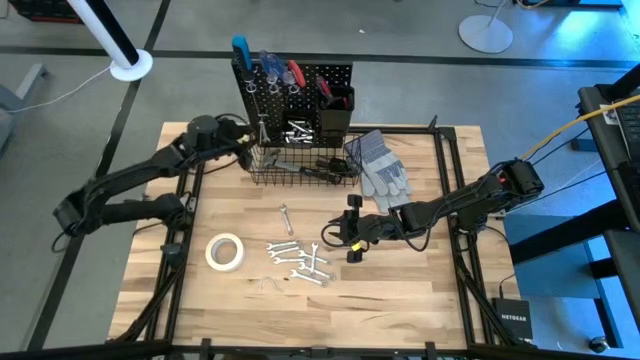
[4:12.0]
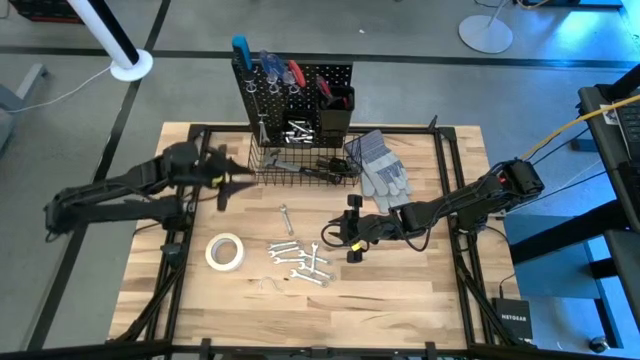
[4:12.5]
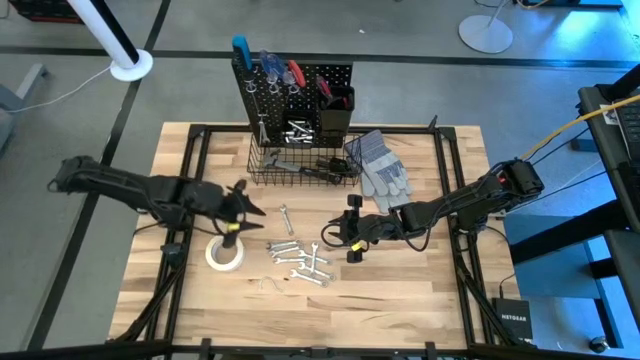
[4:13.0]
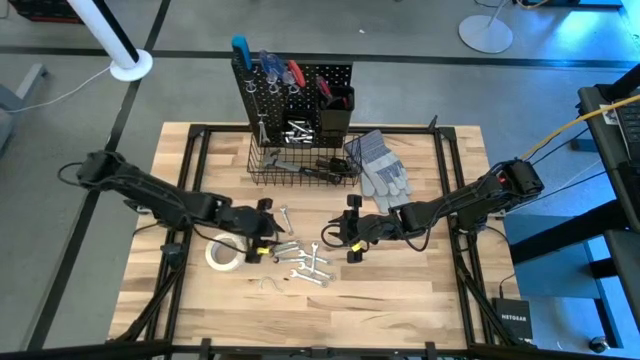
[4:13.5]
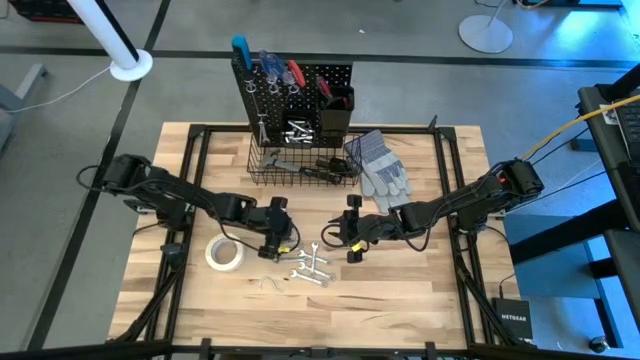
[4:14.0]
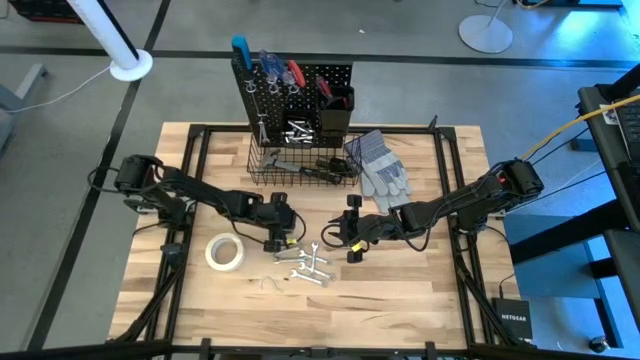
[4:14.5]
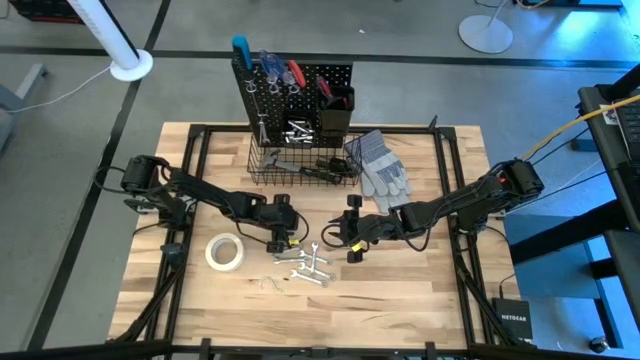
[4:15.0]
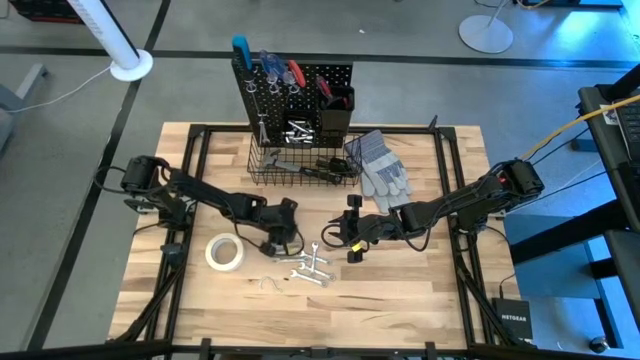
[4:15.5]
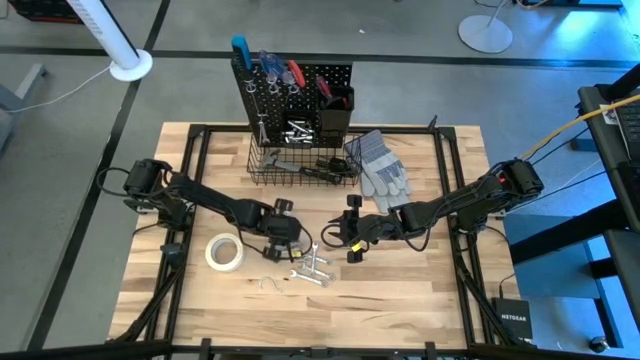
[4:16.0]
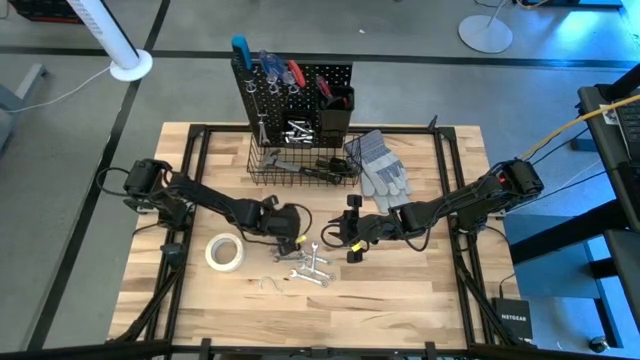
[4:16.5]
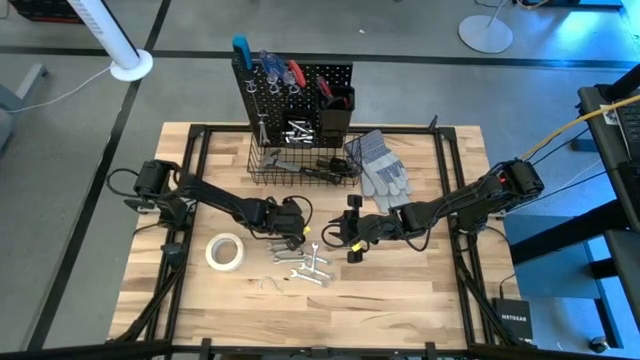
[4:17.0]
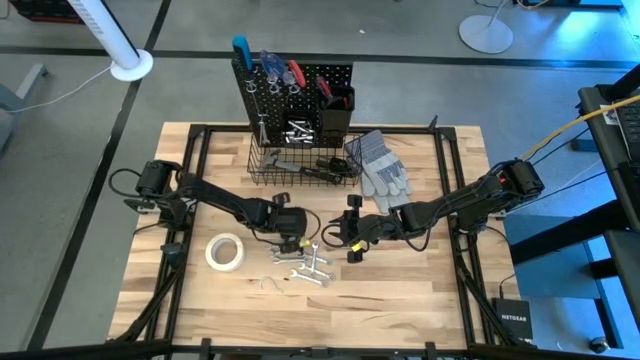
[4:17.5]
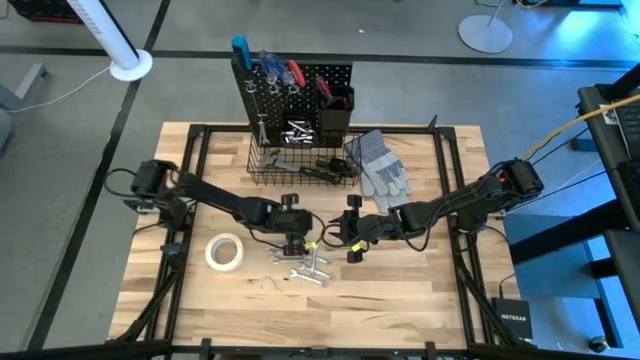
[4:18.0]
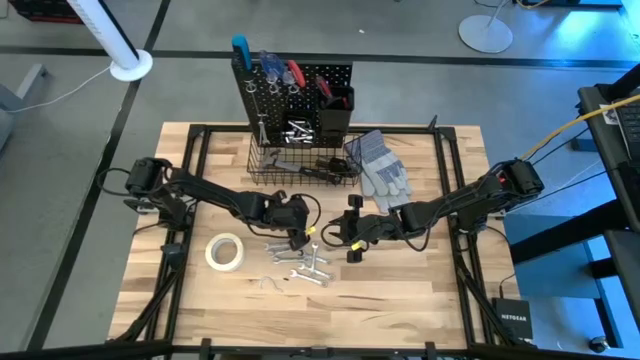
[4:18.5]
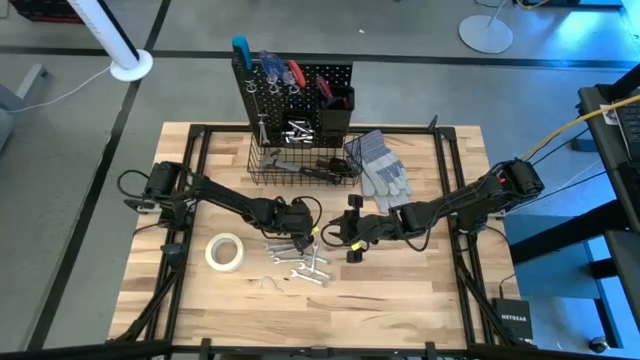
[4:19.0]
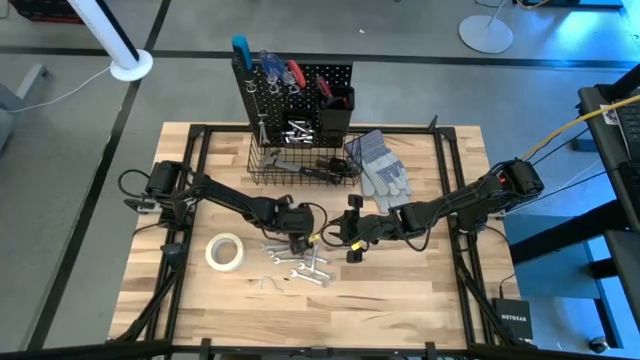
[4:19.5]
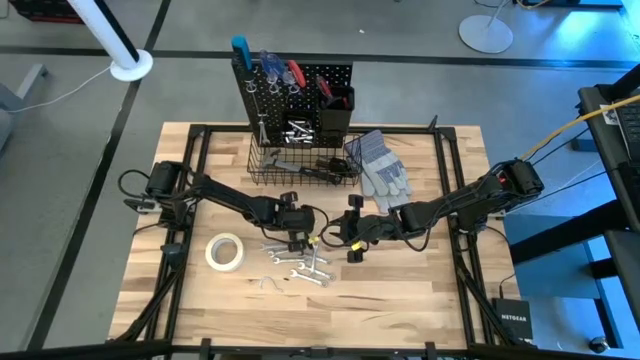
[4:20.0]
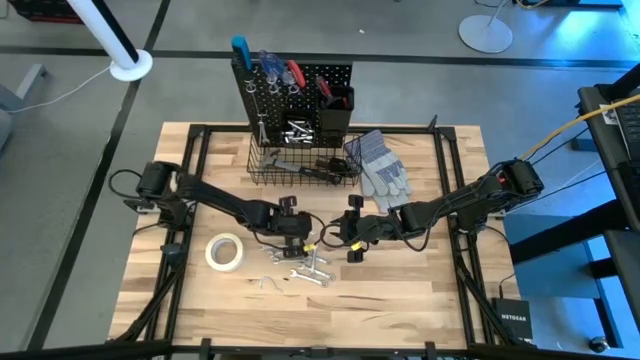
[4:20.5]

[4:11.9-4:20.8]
Task: Hang tools onto peg board
Hang the wrench on the peg board

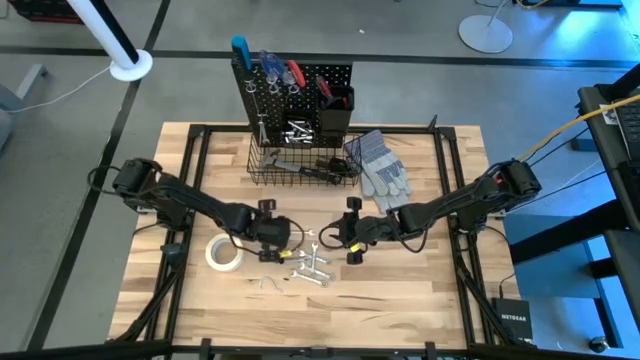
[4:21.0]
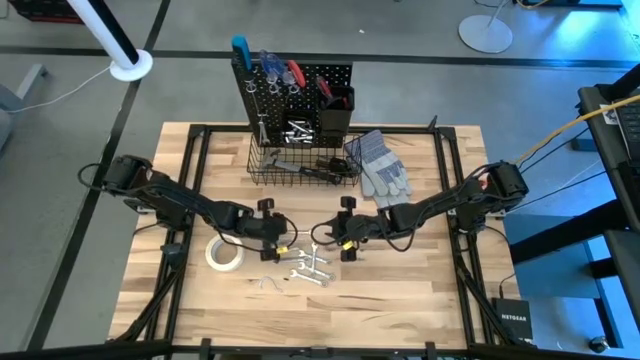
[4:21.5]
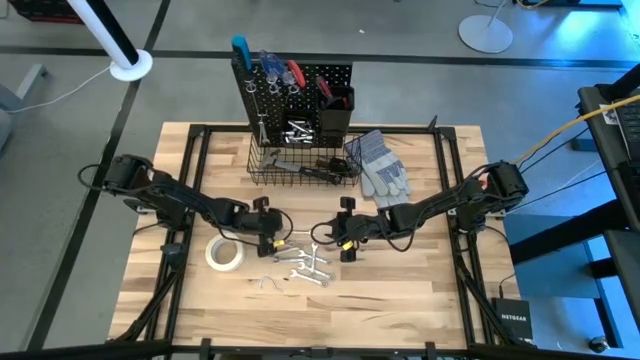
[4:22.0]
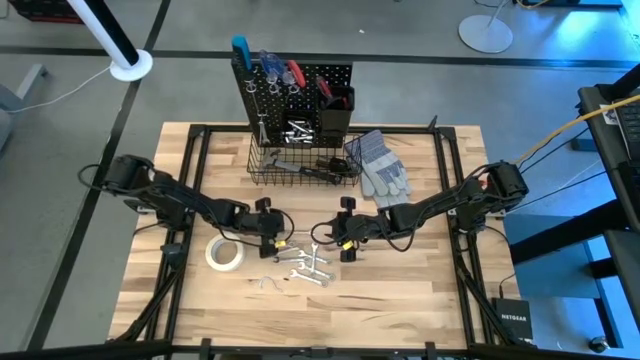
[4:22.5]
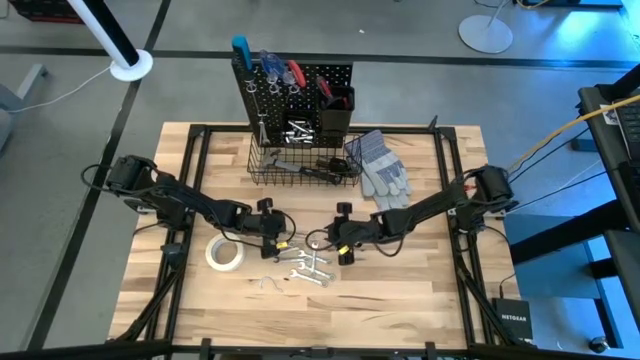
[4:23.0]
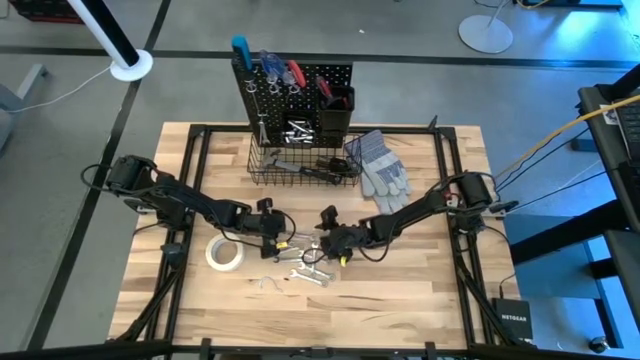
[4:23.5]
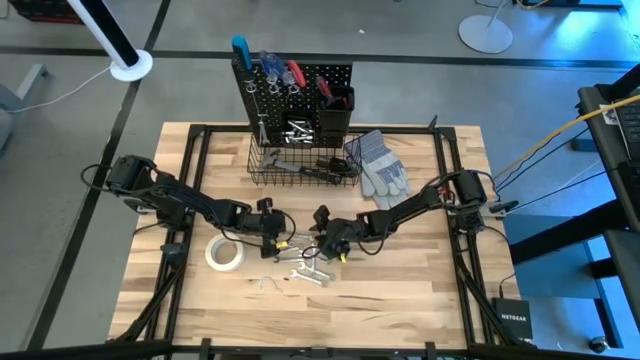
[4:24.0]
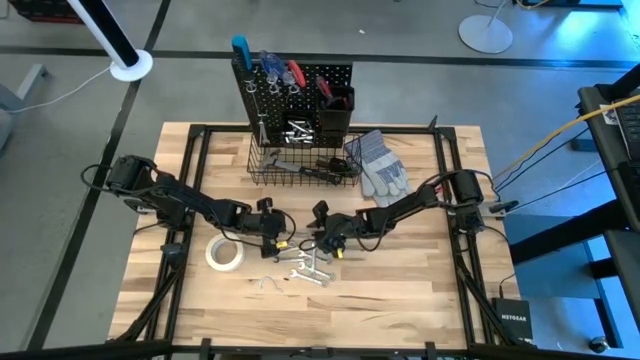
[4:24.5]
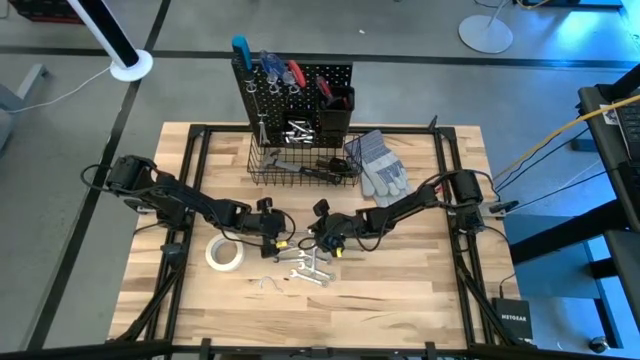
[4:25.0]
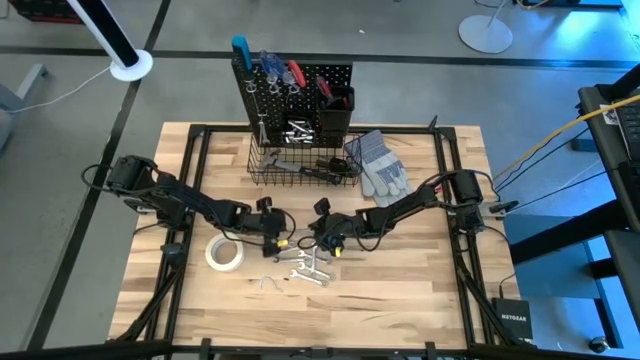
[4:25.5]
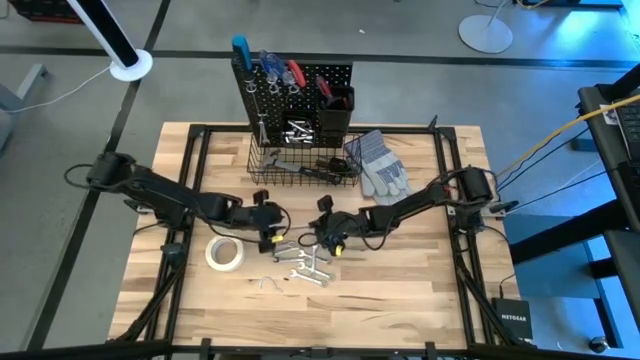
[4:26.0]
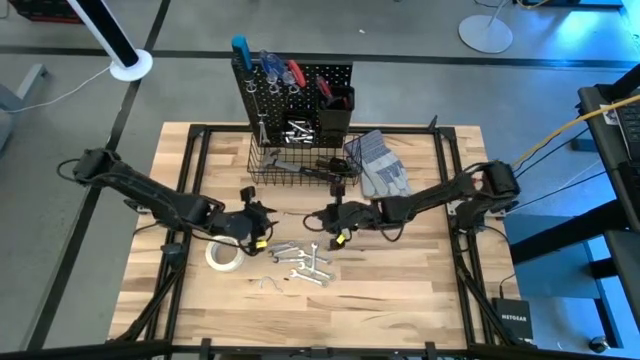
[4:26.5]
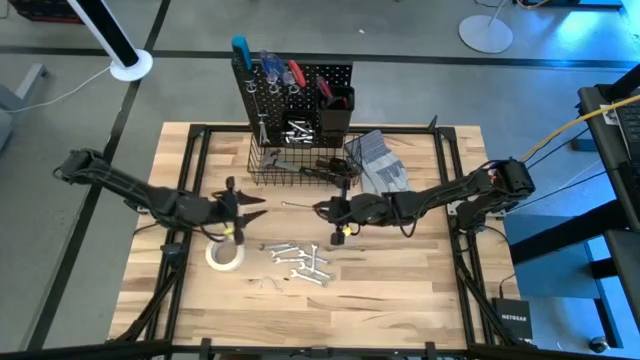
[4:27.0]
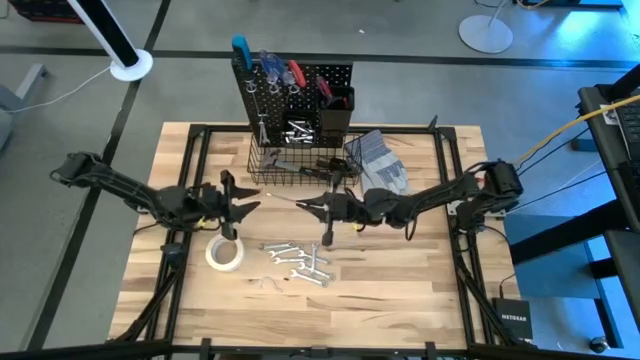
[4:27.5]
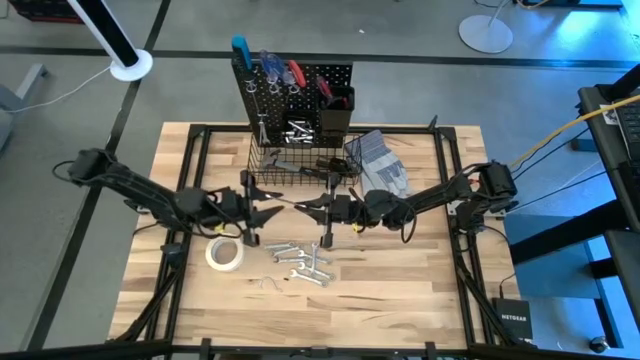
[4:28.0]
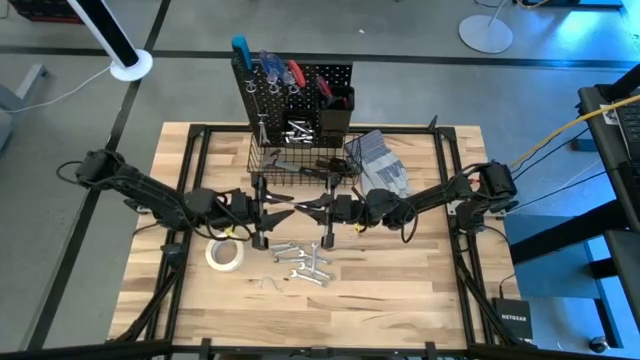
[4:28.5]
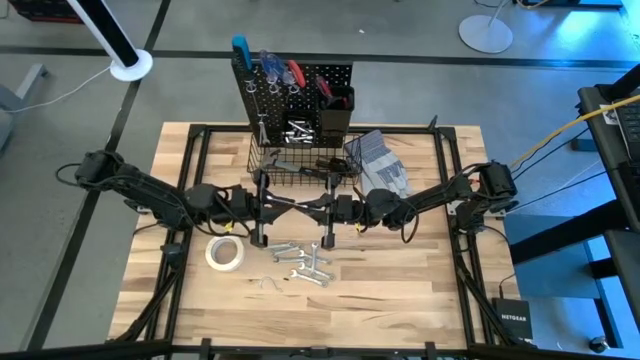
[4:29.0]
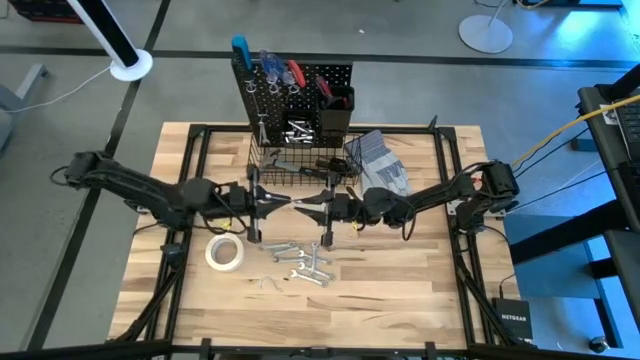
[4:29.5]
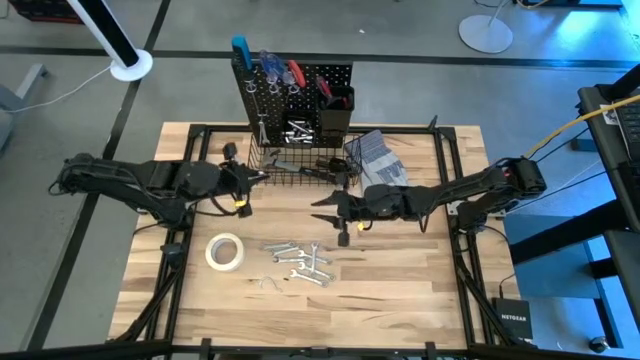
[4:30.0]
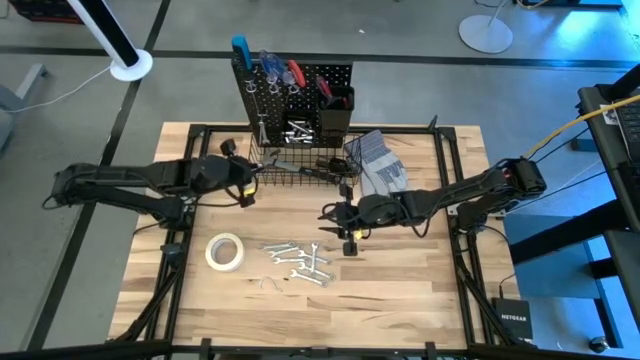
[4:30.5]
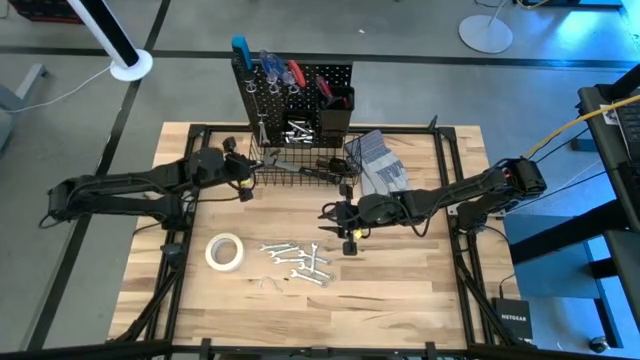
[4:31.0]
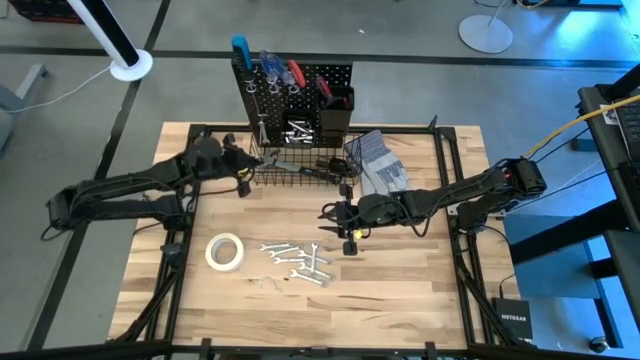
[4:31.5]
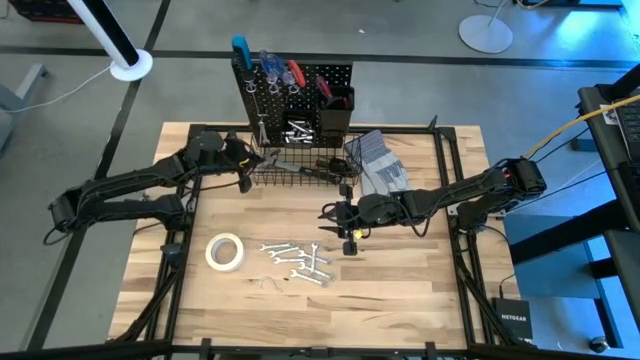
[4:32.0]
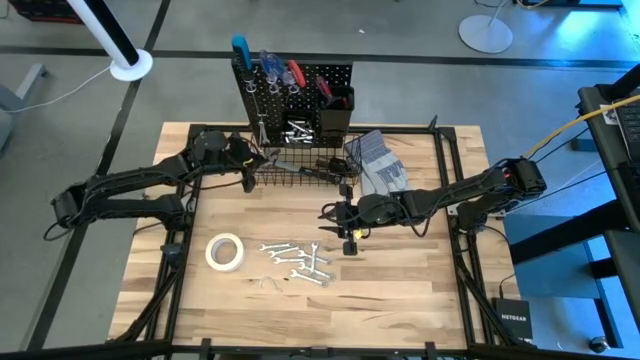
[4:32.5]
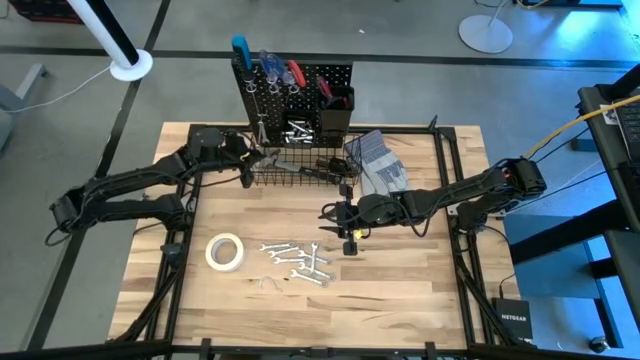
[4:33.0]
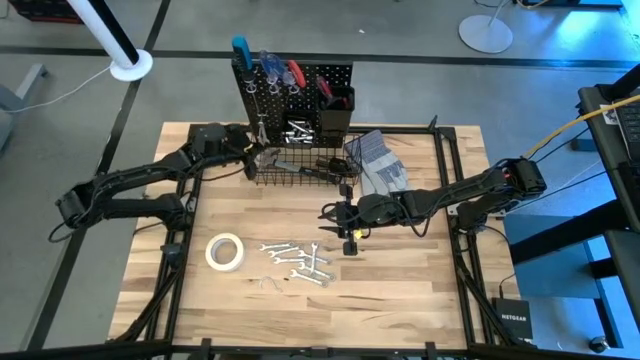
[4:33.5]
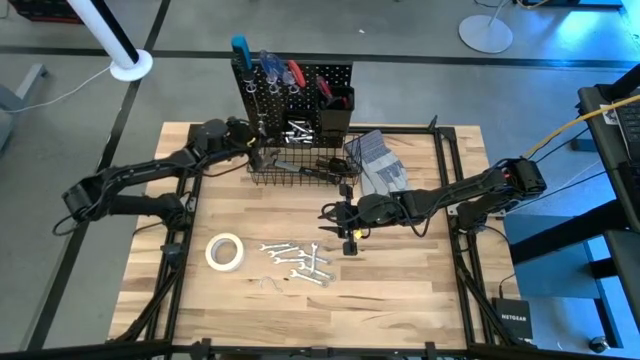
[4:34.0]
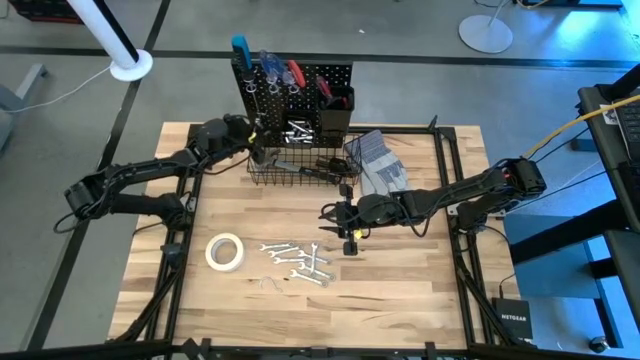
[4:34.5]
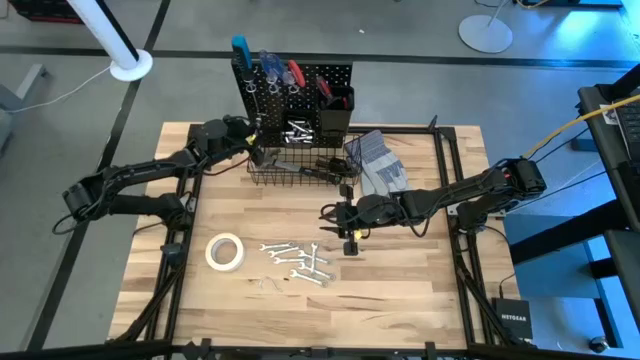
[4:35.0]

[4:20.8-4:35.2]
Hang the wrench on the peg board
